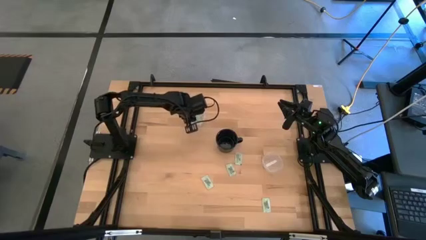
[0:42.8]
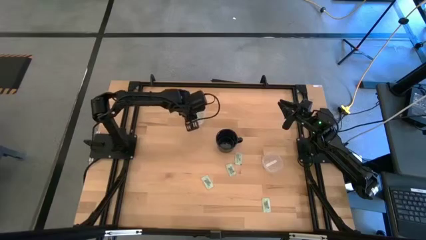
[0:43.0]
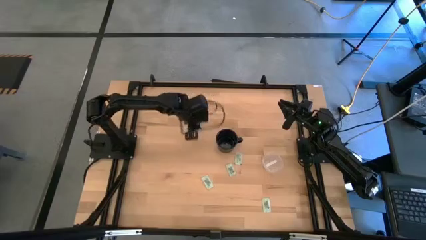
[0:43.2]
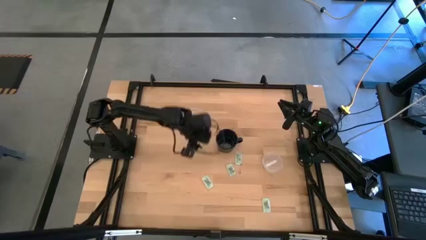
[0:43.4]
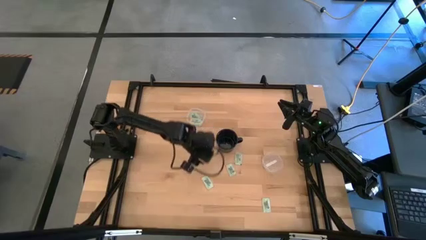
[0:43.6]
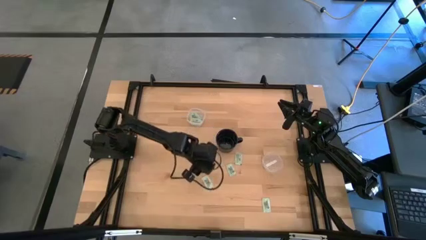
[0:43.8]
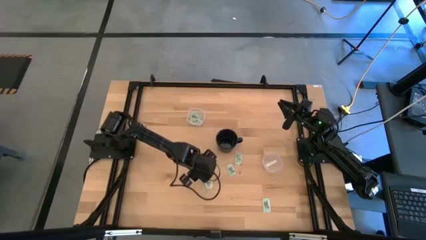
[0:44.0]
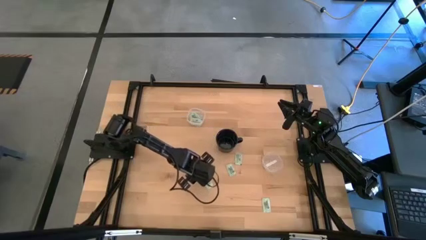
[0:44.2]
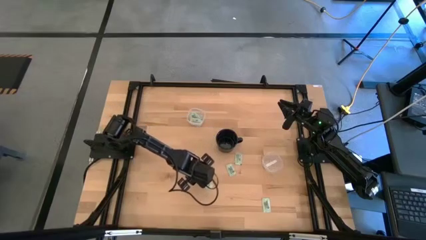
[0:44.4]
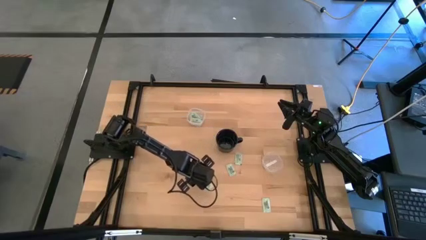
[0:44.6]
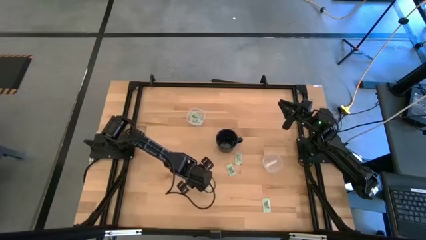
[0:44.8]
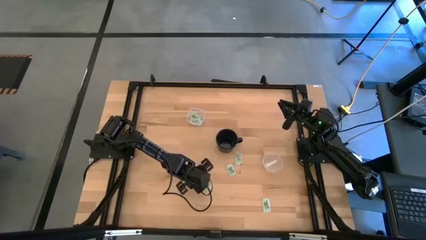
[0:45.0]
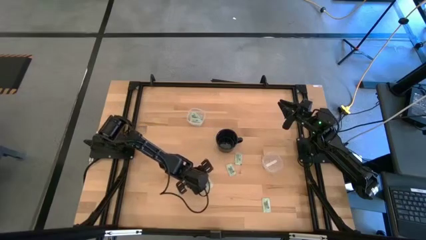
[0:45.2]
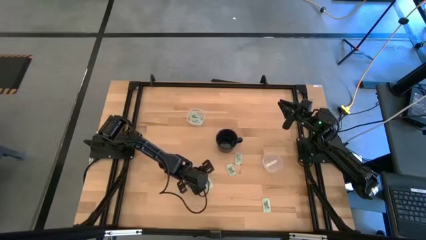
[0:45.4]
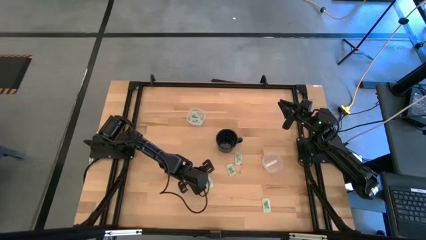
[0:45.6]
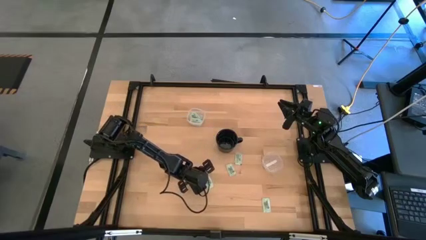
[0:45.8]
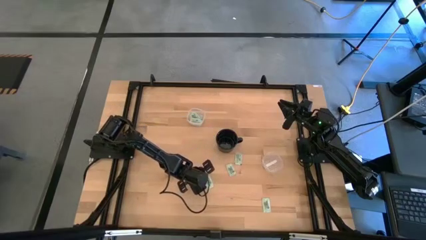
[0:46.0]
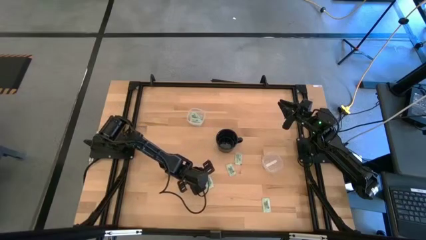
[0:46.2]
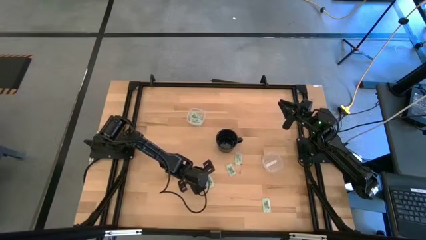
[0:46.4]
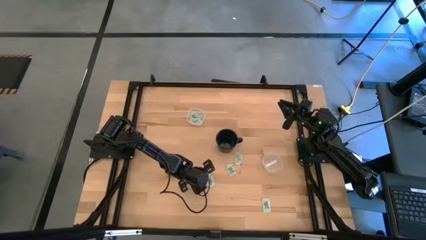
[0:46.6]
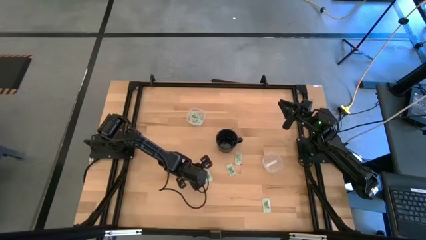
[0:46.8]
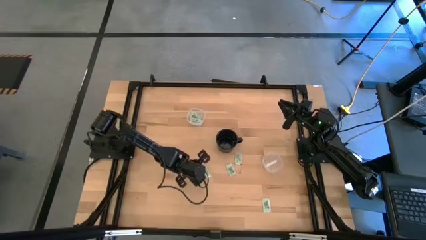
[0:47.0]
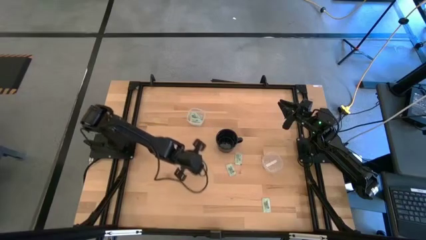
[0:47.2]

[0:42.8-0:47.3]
Task: Pick and place items into bin
Put the green stevia packet into the top transparent bin

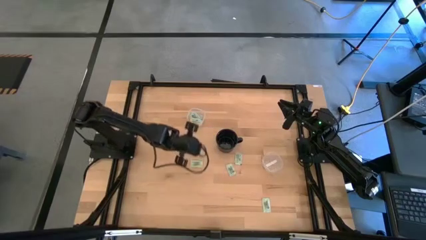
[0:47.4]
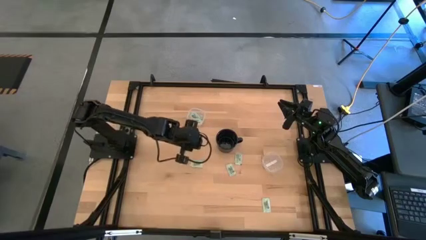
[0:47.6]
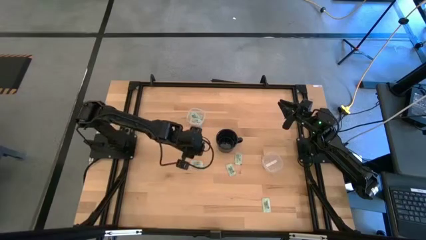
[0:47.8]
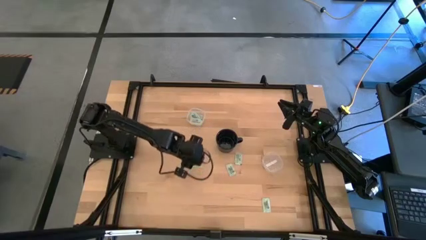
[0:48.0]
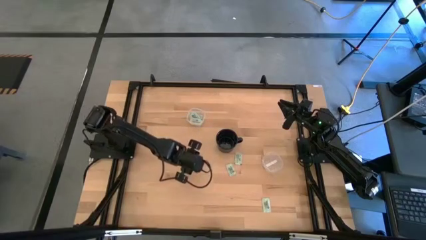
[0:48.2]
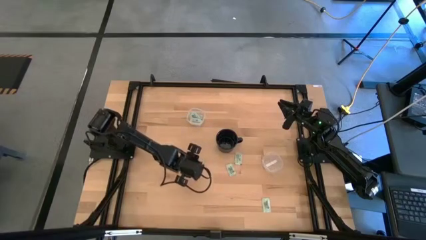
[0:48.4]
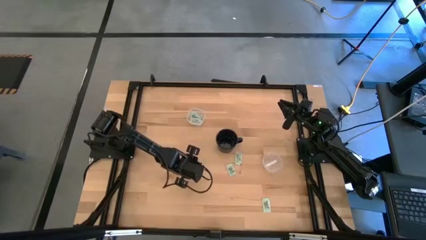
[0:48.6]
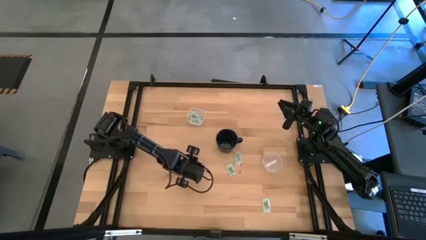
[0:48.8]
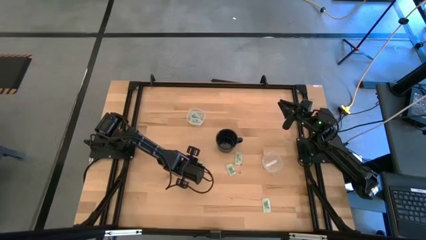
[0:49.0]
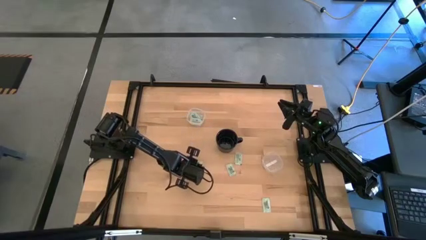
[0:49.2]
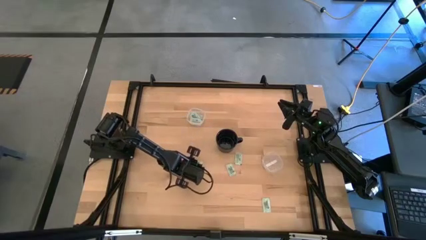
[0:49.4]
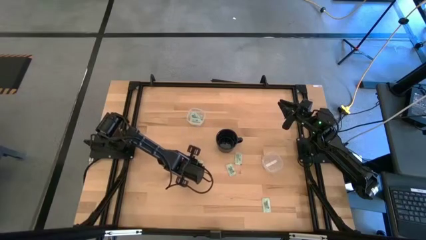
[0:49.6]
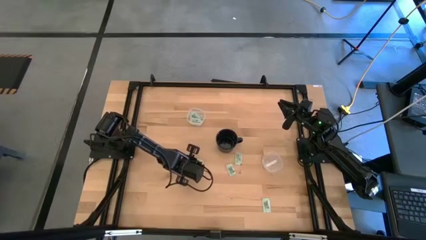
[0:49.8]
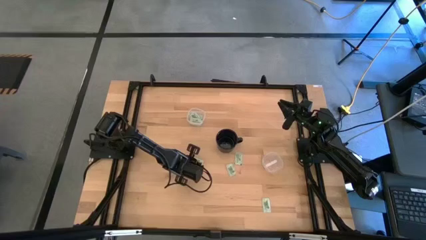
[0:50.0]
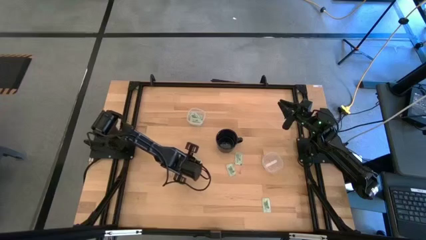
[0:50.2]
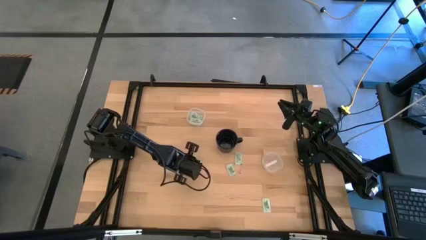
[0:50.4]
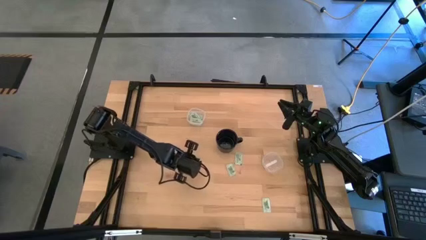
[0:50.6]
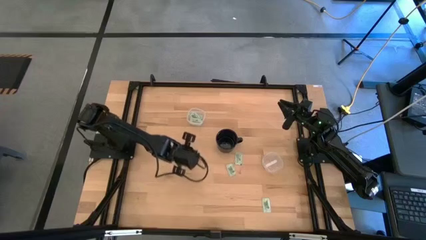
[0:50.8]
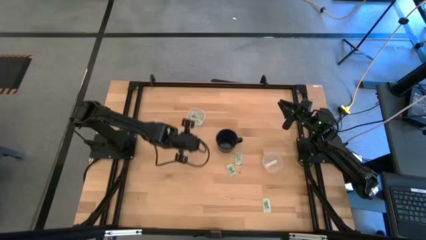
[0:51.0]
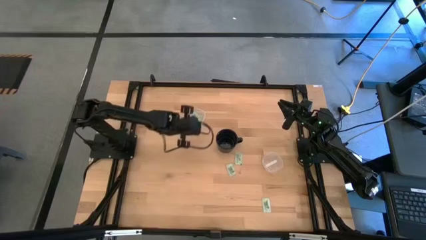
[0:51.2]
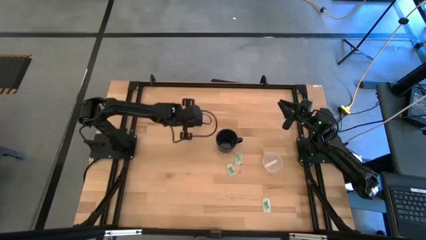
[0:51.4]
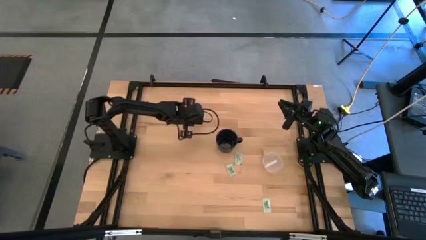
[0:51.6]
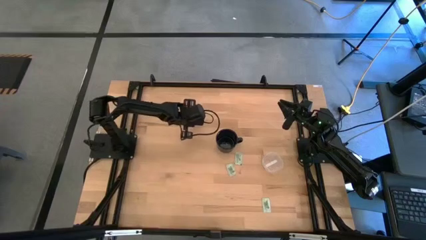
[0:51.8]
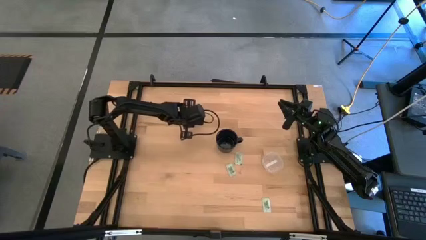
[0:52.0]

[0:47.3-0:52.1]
Put the green stevia packet into the top transparent bin

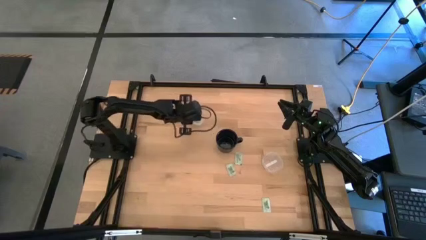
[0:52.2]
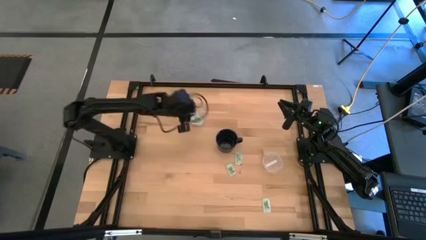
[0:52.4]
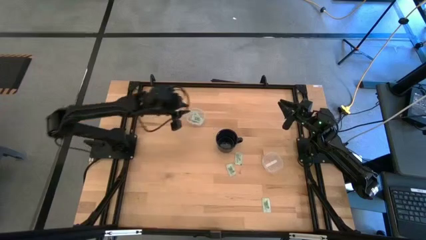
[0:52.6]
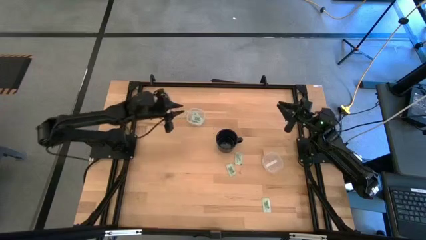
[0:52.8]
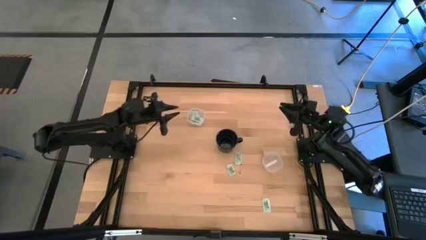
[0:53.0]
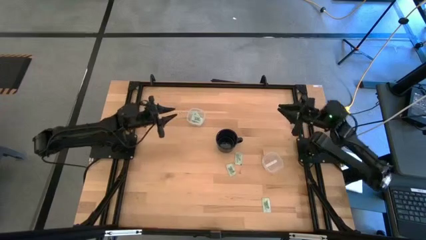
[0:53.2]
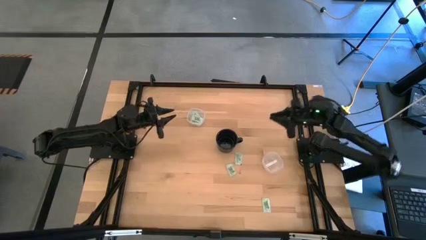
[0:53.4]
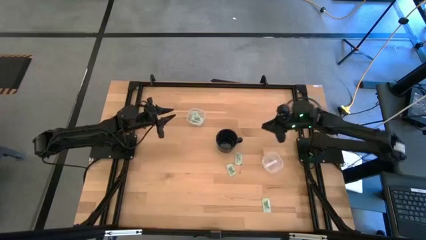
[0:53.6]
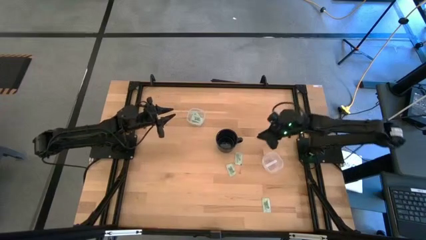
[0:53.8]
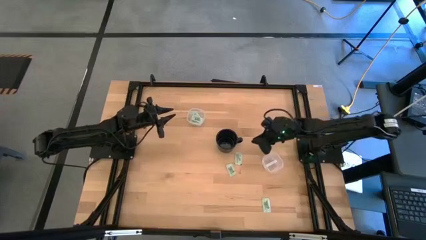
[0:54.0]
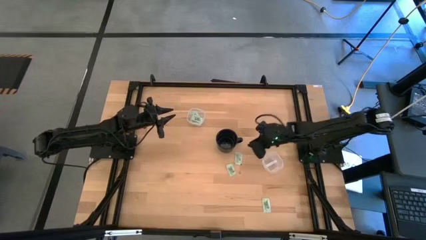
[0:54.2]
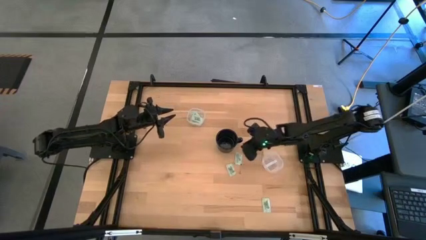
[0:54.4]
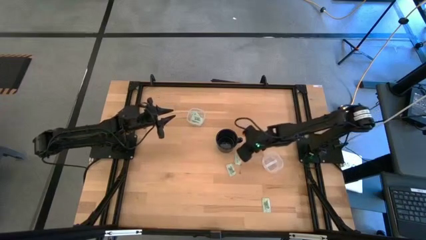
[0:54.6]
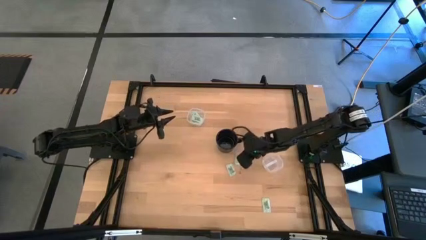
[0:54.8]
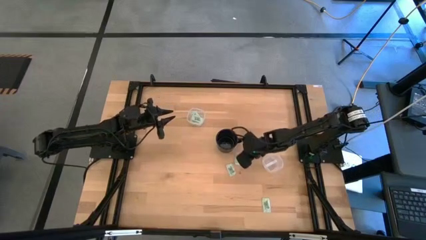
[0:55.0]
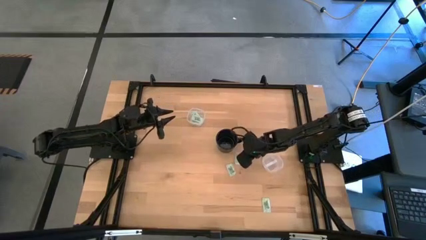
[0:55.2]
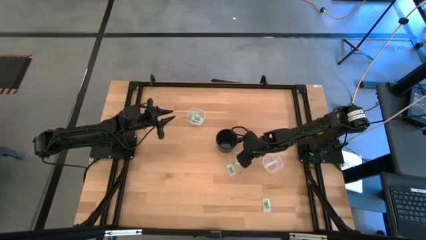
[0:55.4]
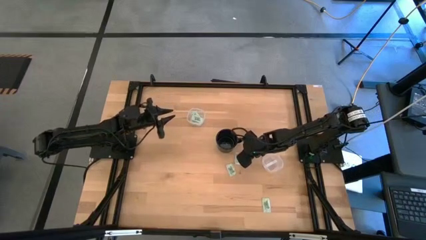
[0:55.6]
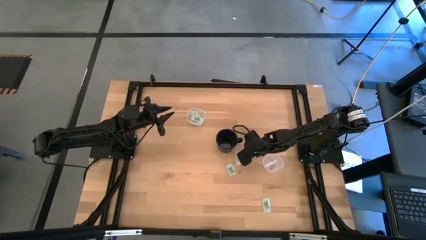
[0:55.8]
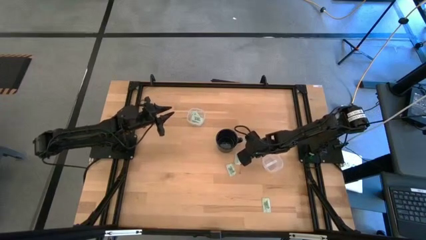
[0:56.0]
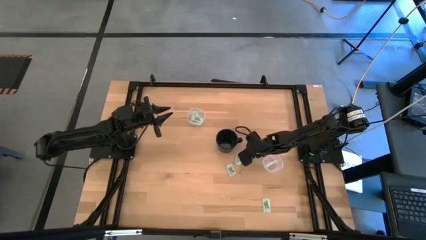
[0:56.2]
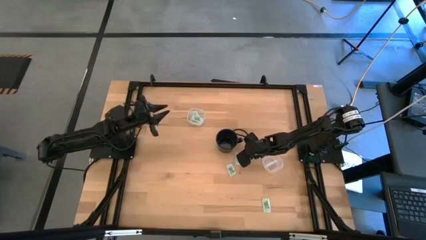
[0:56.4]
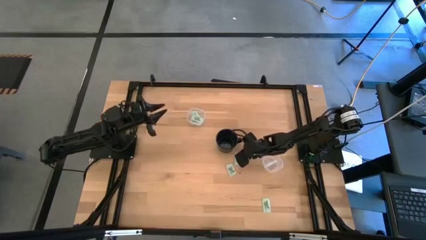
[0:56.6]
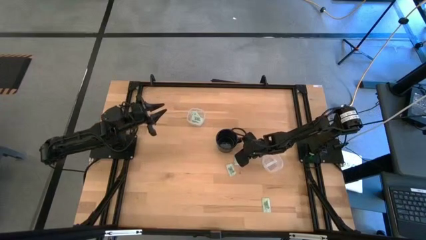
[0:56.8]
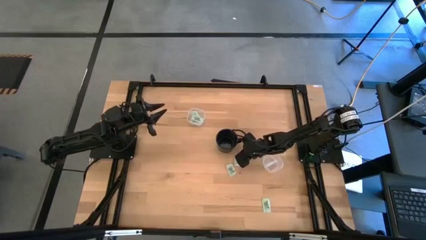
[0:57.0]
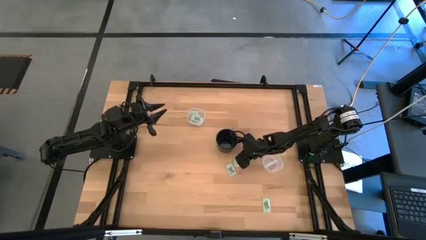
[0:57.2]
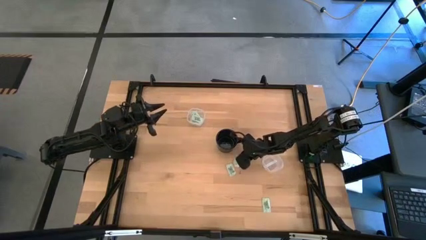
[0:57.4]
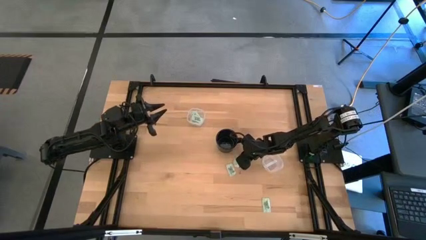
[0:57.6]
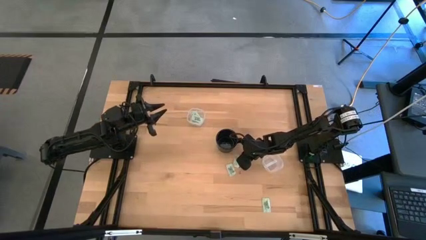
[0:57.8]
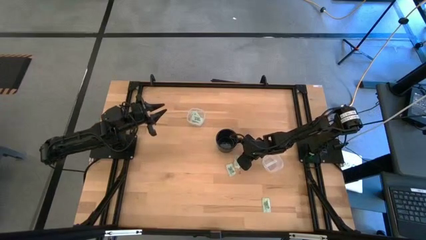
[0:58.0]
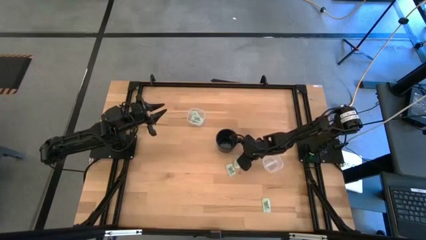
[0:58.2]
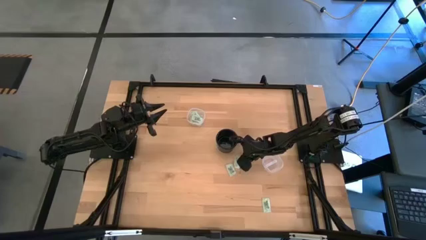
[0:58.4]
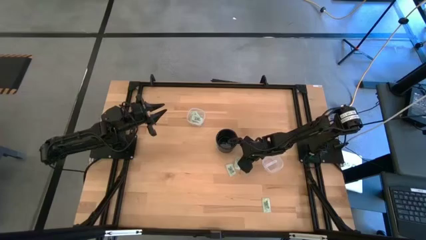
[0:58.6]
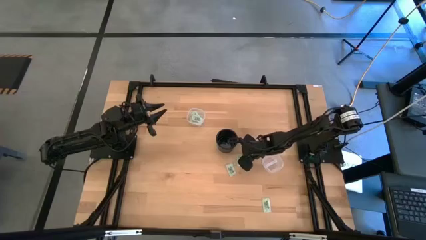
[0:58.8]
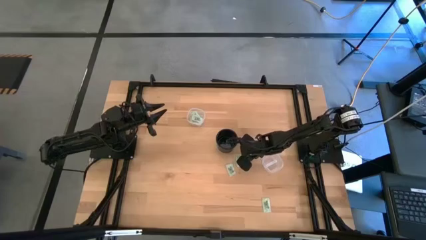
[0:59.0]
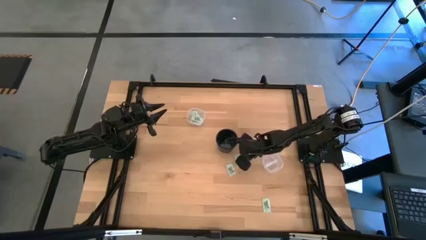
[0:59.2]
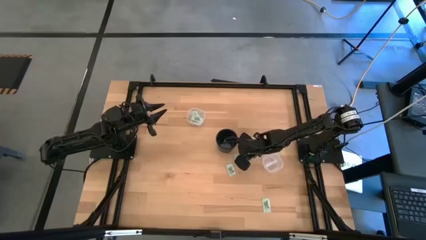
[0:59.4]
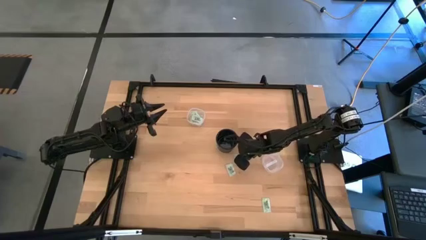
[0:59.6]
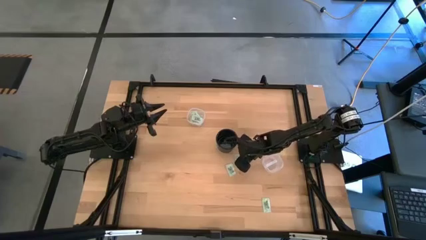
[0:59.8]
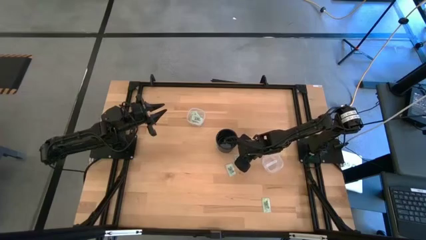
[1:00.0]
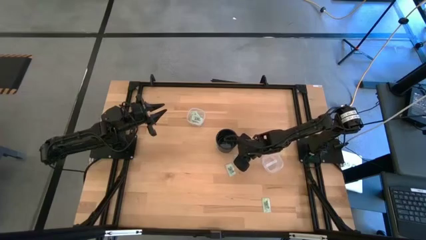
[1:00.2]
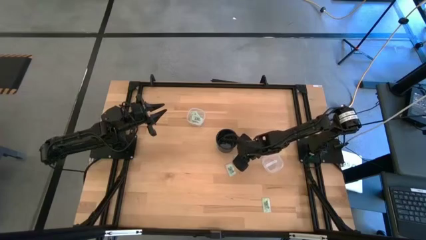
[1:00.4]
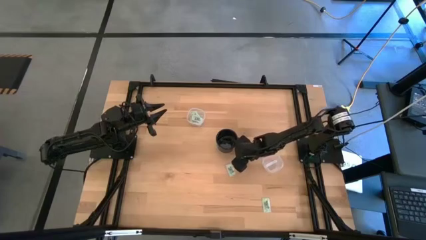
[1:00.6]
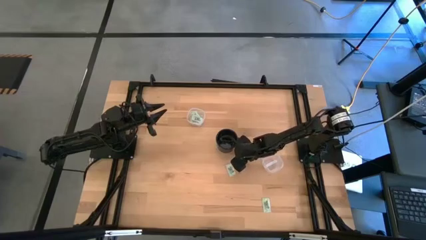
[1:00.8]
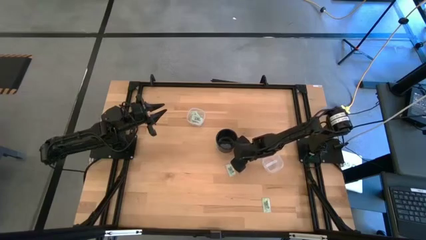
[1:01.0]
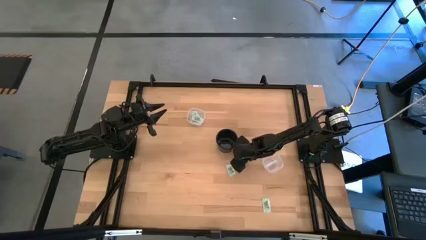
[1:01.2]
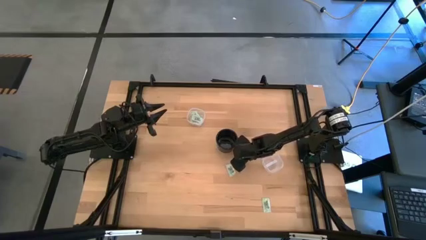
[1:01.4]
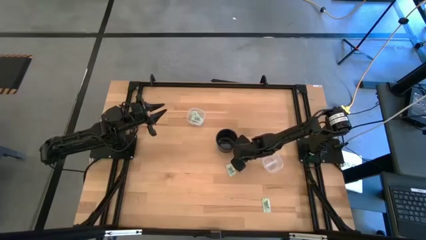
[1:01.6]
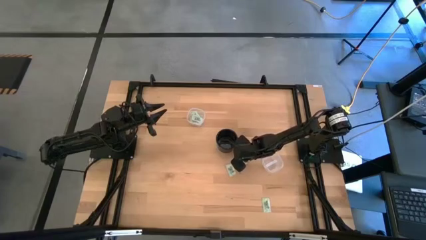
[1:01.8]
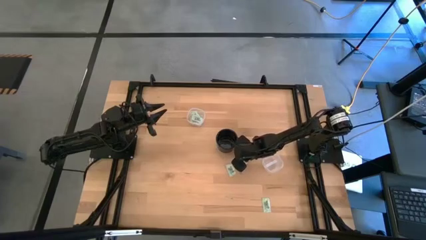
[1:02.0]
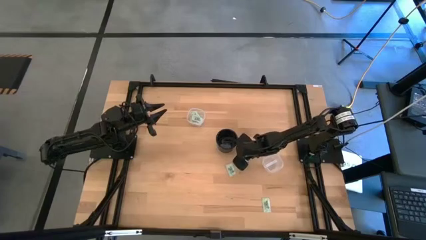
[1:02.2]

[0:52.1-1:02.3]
Put the top green stevia packet into the bottom transparent bin
